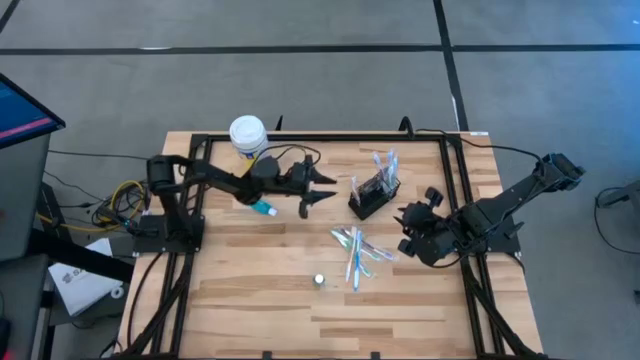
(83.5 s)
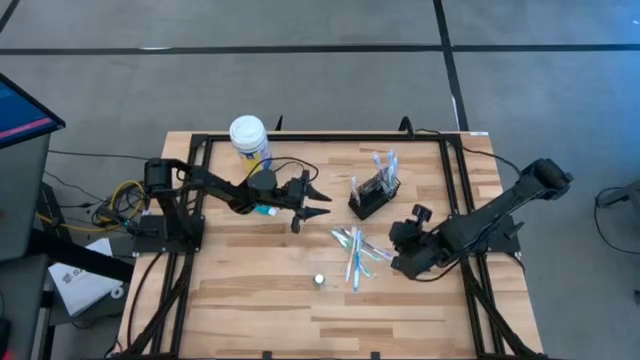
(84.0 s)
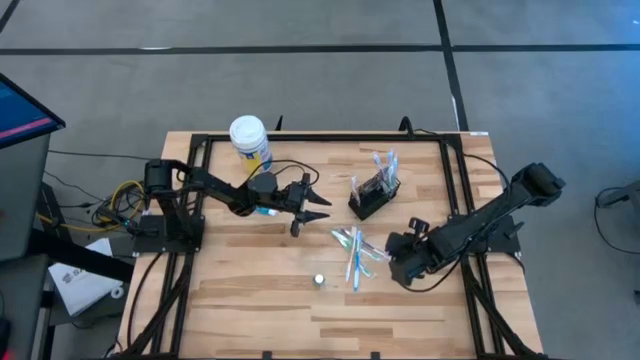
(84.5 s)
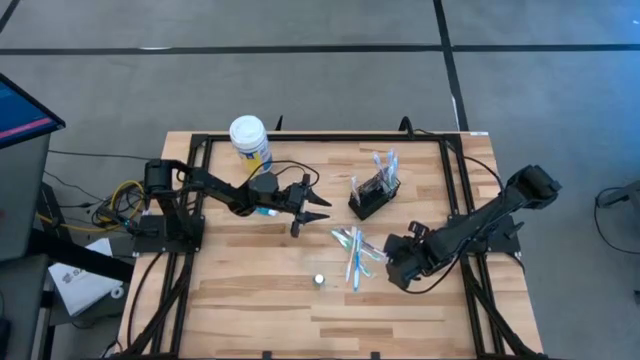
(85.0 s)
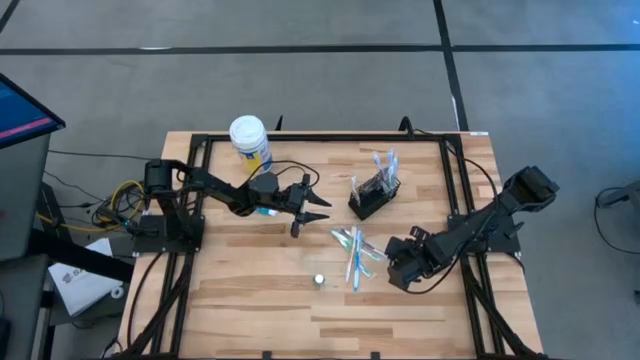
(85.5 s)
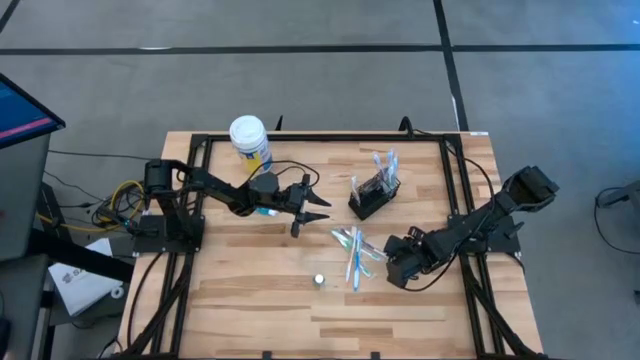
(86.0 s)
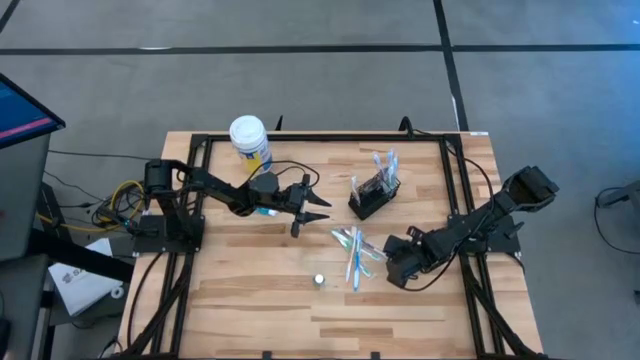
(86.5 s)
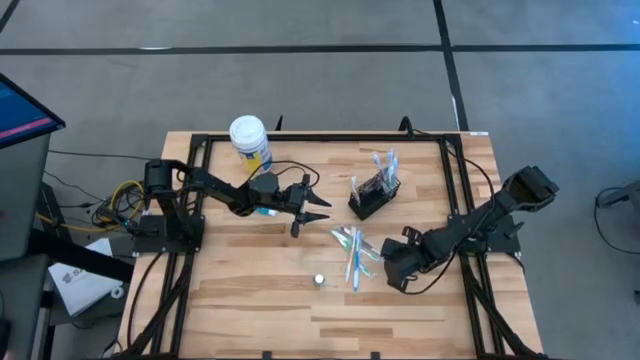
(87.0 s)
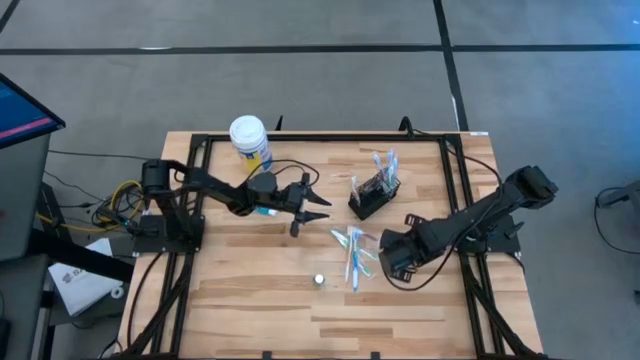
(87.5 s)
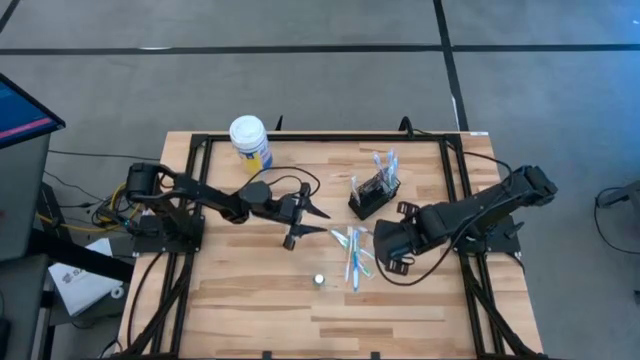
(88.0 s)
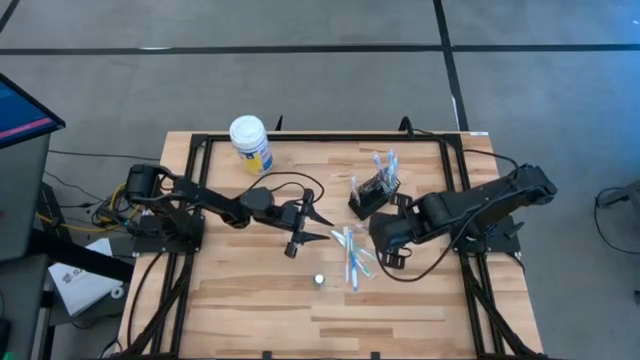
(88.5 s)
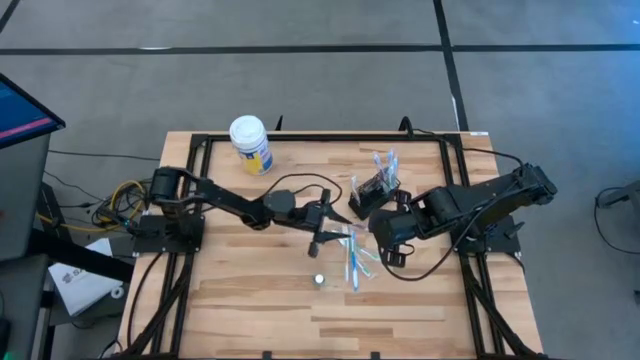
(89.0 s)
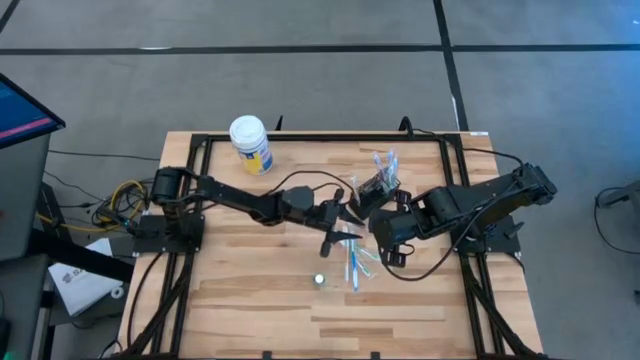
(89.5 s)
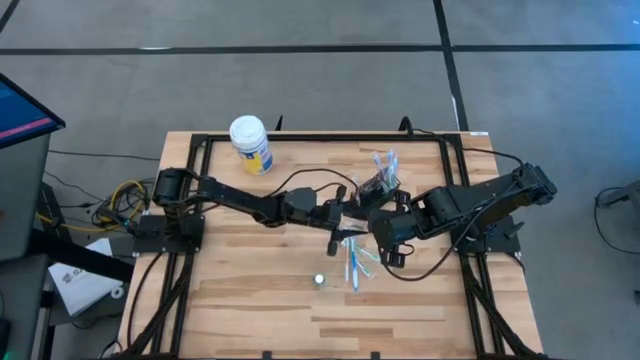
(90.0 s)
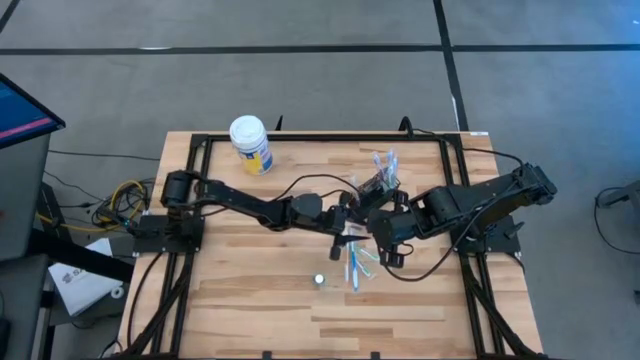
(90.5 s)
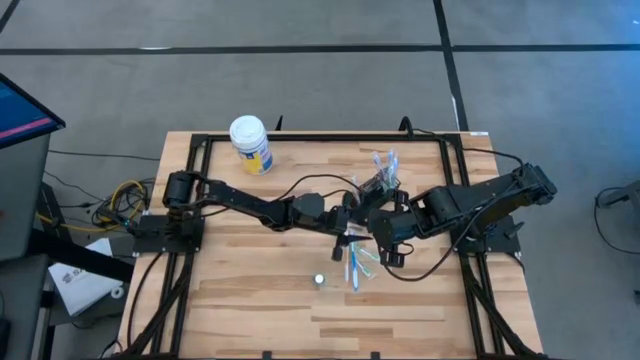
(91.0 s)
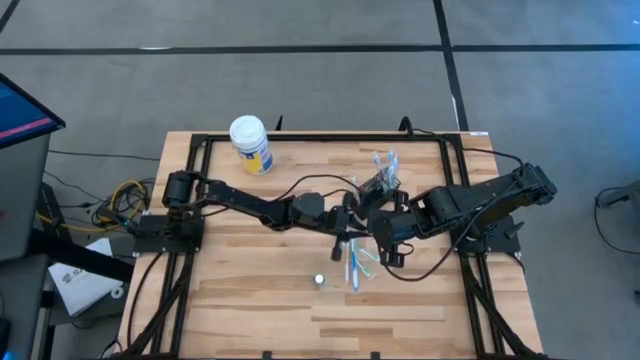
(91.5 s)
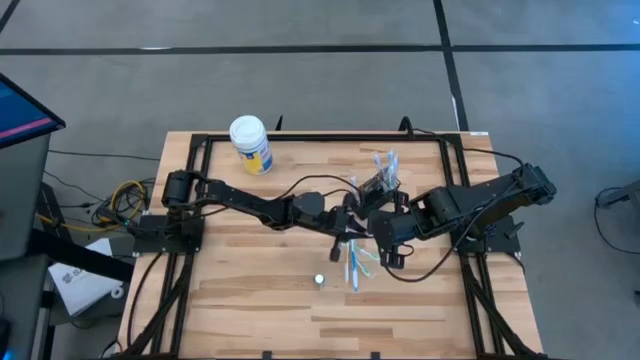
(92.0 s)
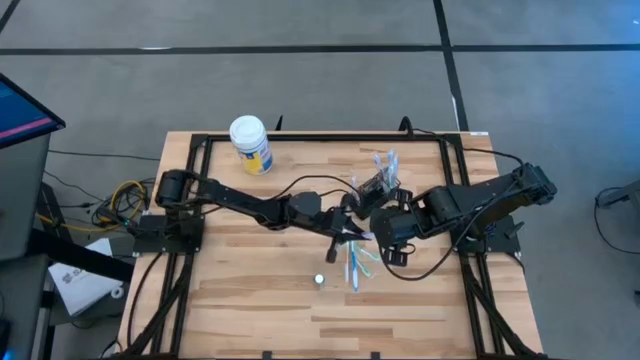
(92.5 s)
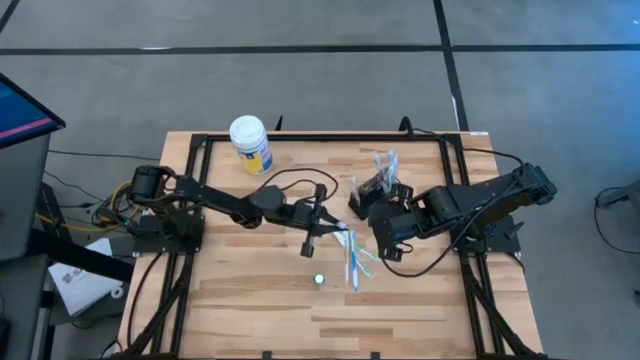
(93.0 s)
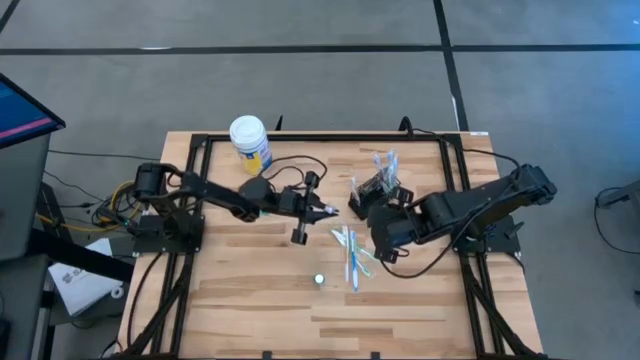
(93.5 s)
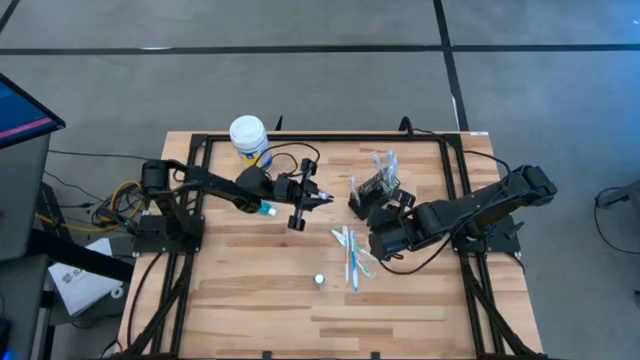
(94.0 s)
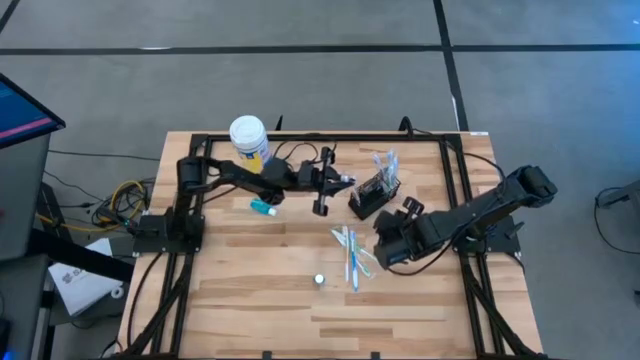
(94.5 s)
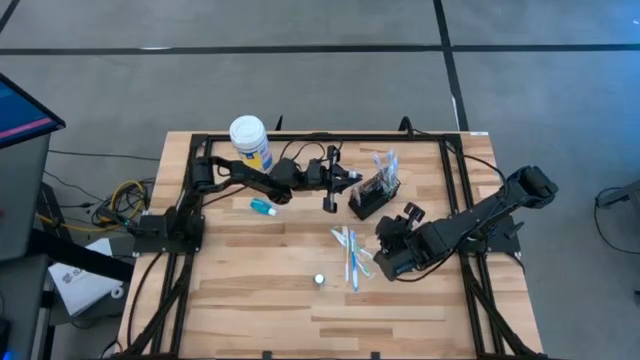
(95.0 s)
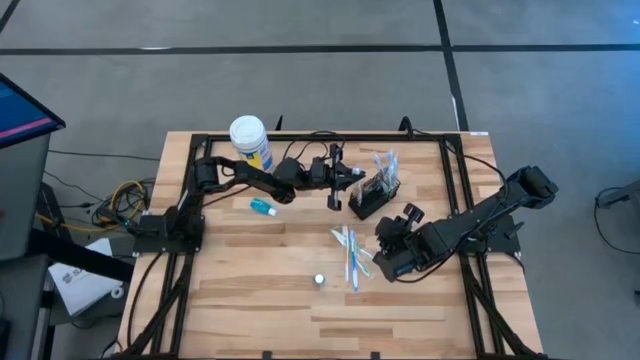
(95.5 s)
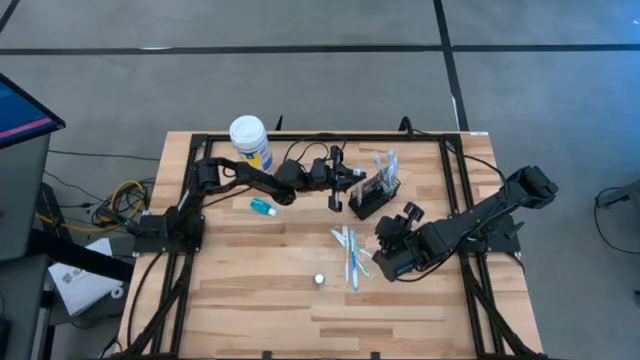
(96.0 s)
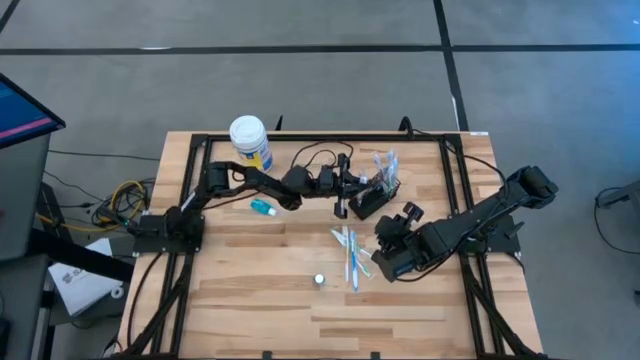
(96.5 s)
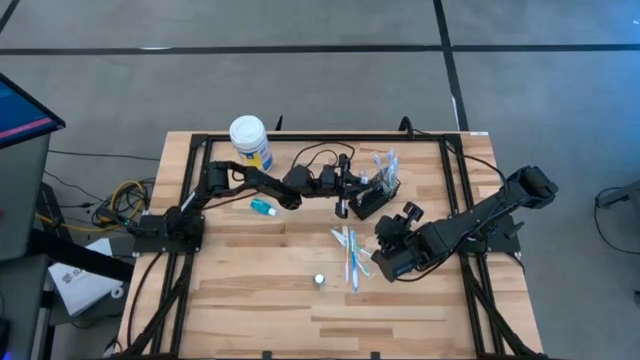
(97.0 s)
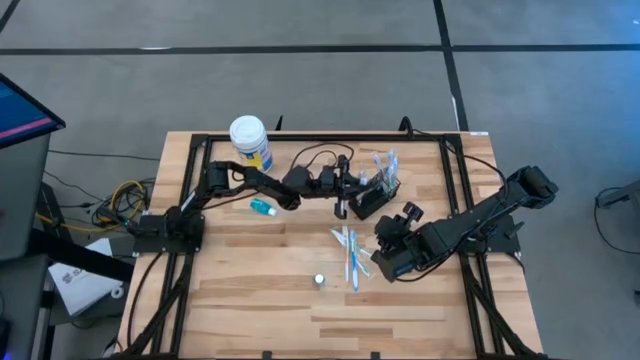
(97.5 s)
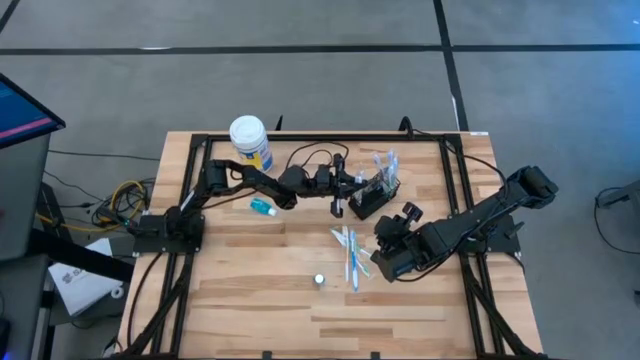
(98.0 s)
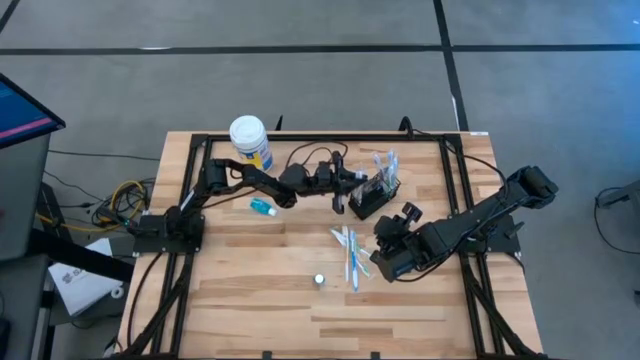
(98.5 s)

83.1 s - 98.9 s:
Task: Pick & Place toothbrushing station
Put the purple toothbrush into the mesh organizer

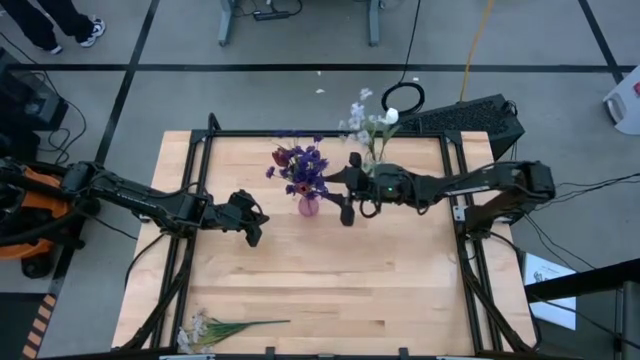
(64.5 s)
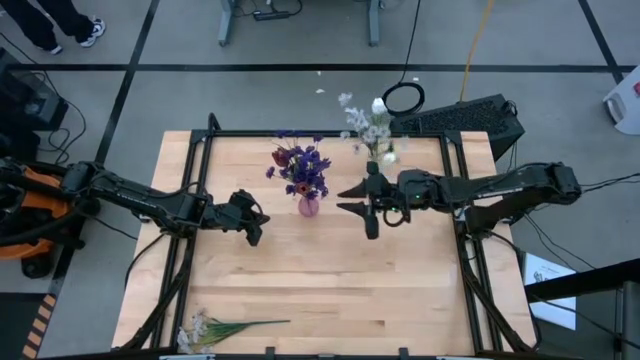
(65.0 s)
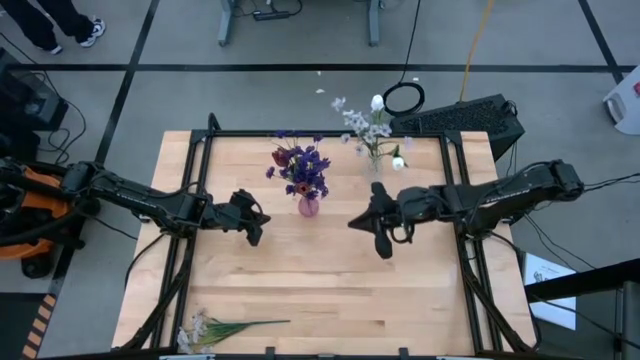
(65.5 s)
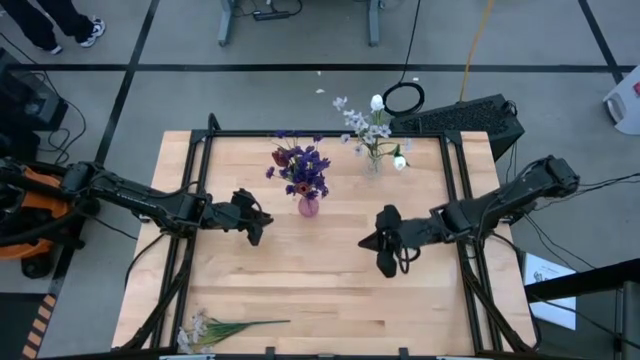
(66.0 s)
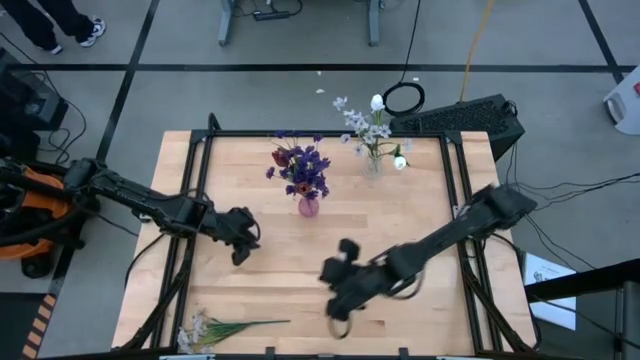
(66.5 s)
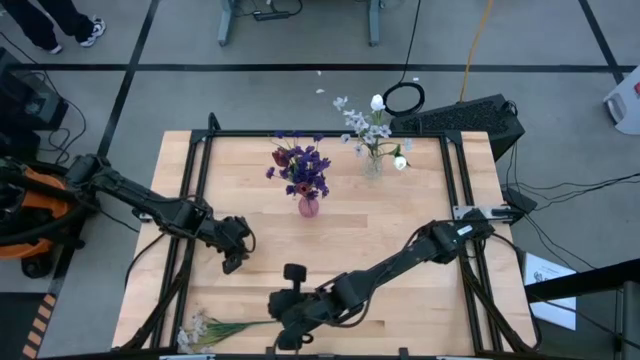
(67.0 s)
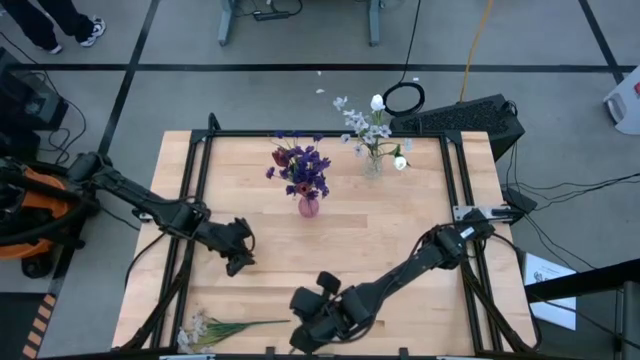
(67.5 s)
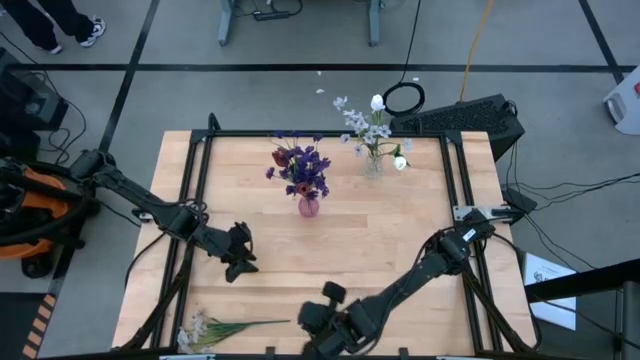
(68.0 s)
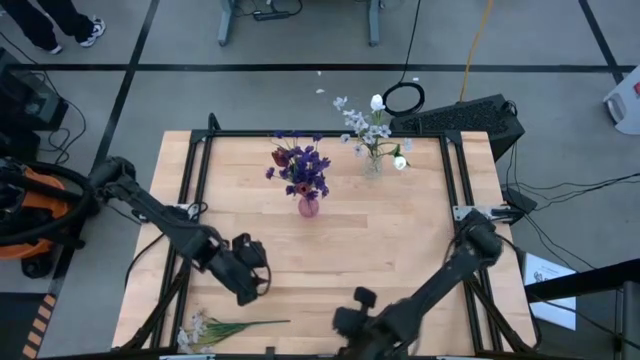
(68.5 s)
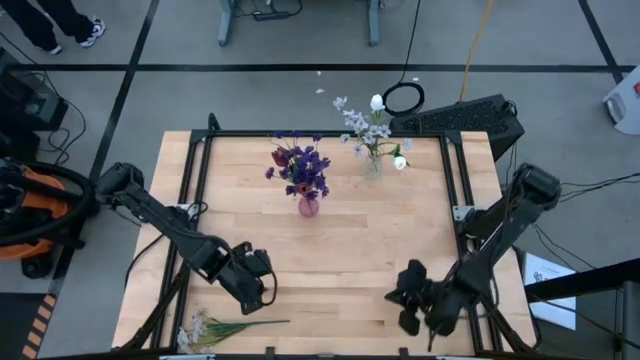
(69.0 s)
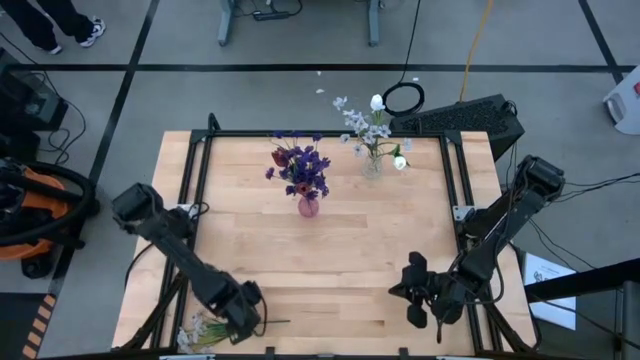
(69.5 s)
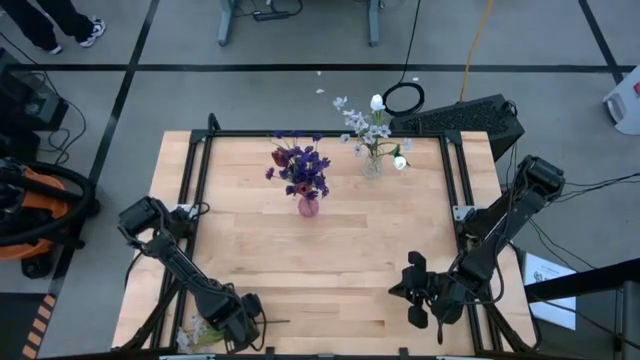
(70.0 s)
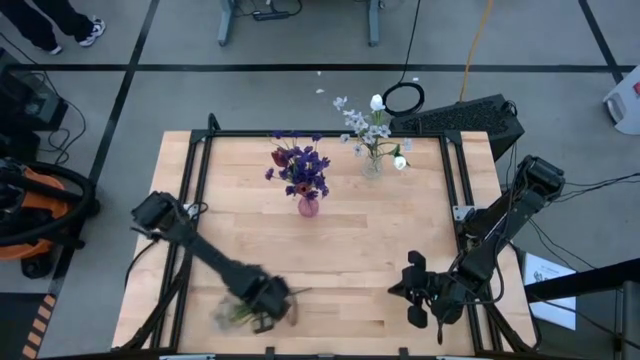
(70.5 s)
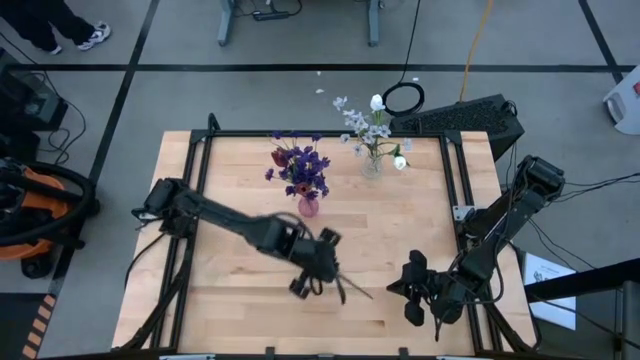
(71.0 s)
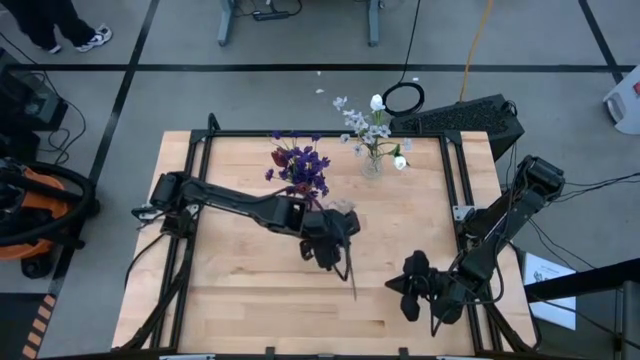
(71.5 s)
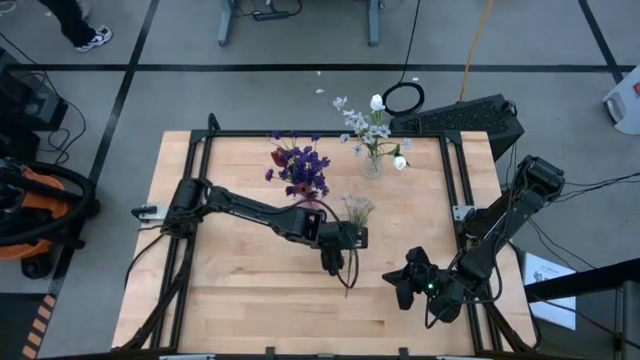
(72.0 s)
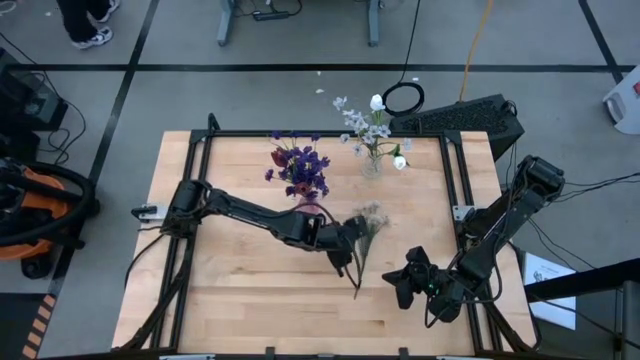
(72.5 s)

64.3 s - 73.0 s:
Task: Sort flowers into vase by color
Move the white flowers to the center of the table
